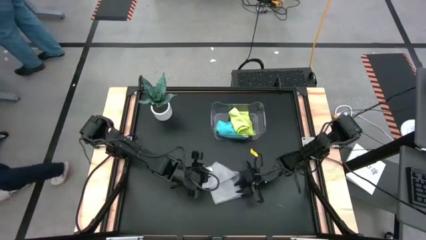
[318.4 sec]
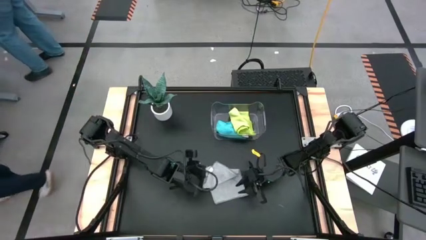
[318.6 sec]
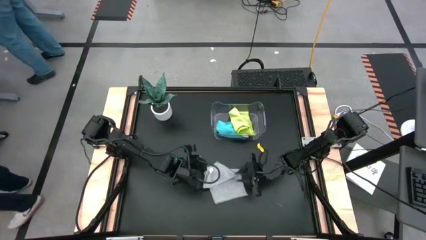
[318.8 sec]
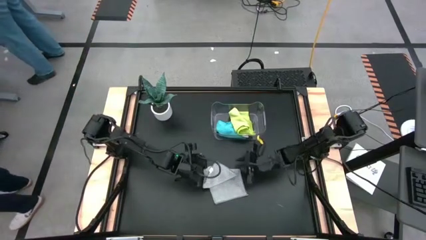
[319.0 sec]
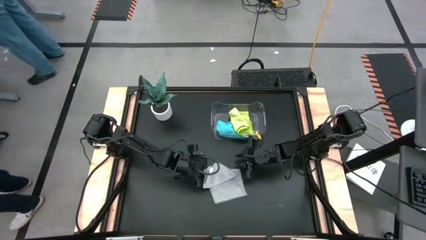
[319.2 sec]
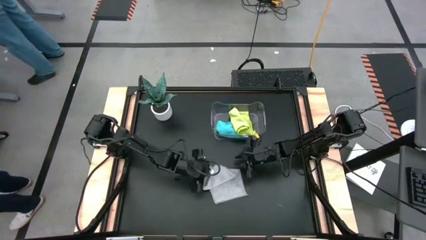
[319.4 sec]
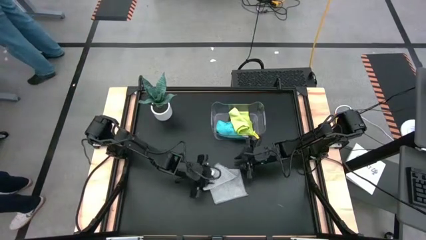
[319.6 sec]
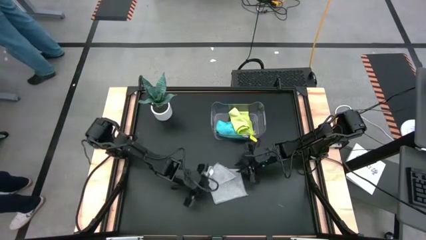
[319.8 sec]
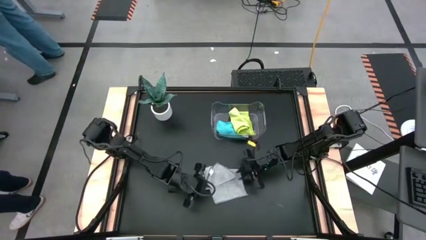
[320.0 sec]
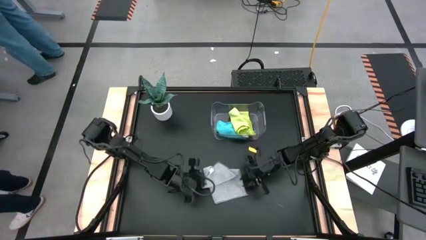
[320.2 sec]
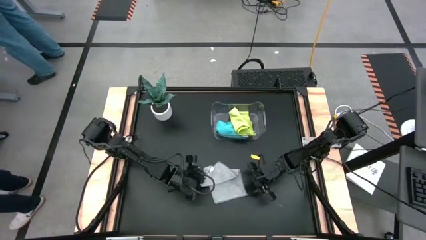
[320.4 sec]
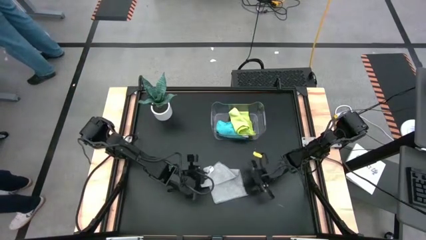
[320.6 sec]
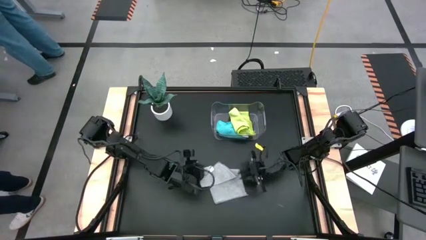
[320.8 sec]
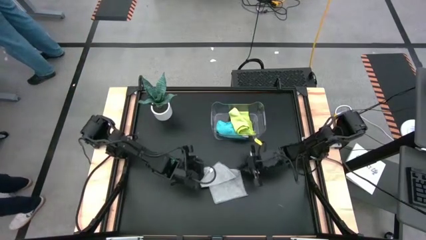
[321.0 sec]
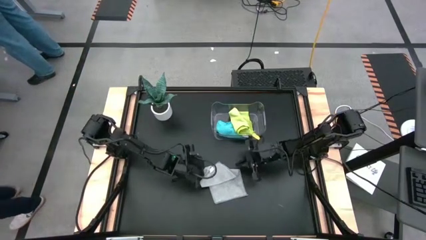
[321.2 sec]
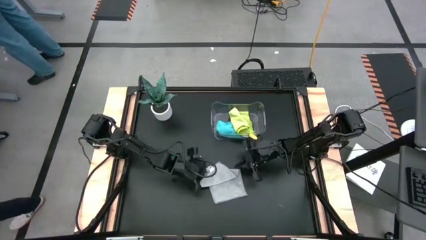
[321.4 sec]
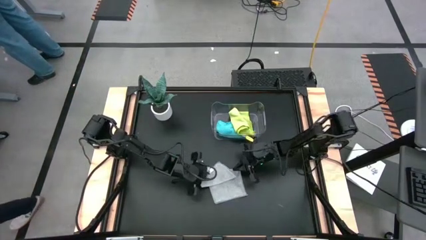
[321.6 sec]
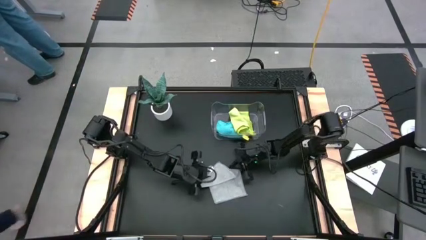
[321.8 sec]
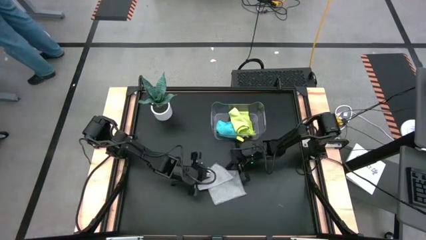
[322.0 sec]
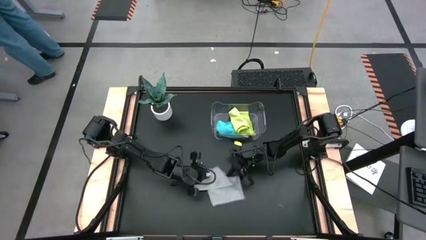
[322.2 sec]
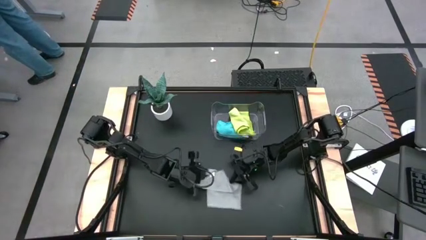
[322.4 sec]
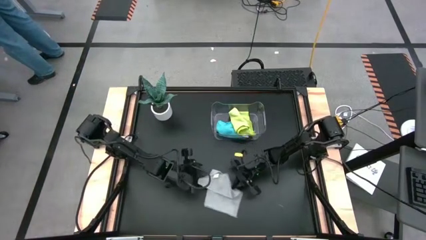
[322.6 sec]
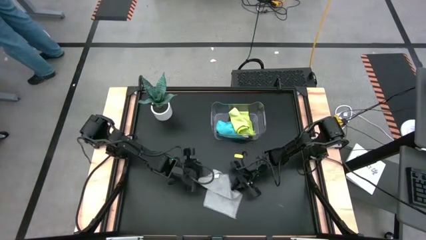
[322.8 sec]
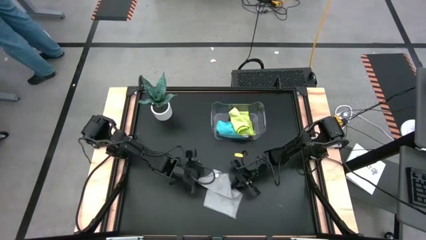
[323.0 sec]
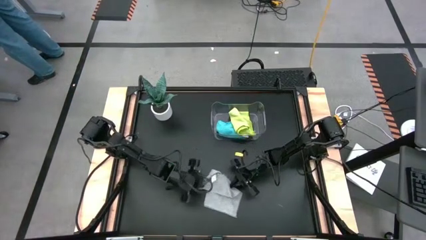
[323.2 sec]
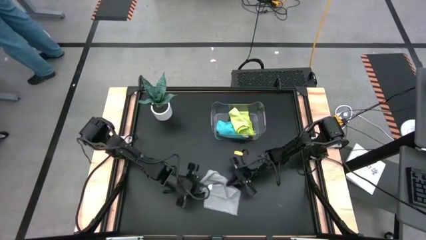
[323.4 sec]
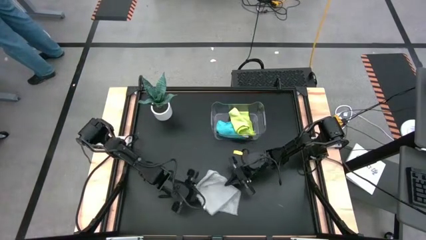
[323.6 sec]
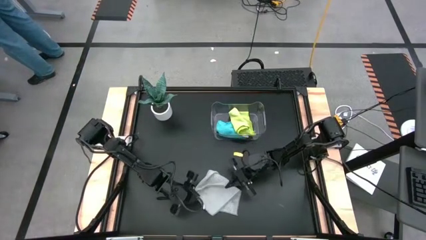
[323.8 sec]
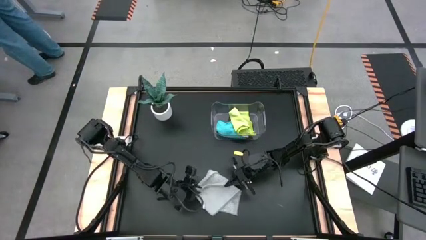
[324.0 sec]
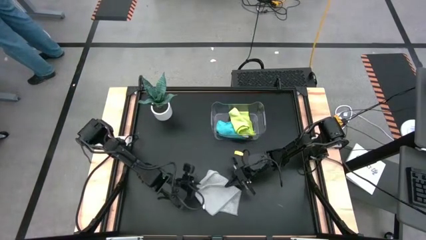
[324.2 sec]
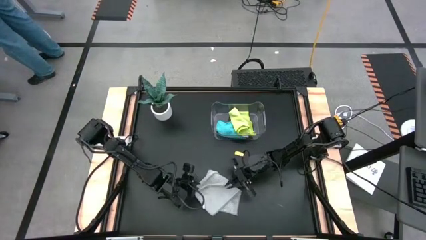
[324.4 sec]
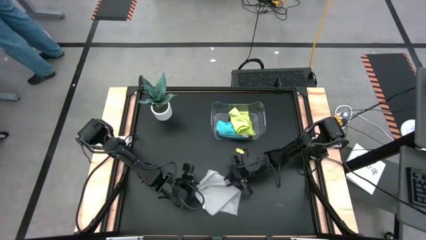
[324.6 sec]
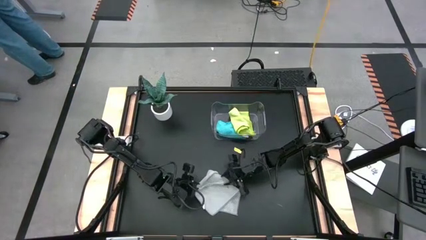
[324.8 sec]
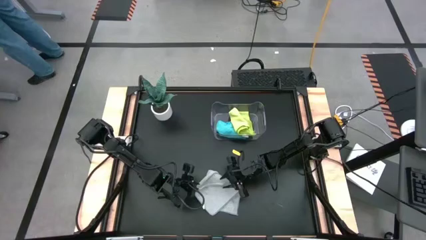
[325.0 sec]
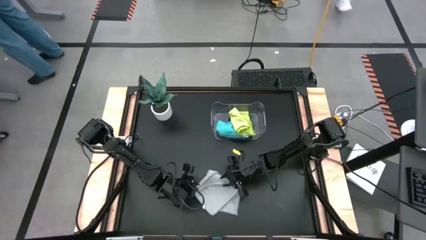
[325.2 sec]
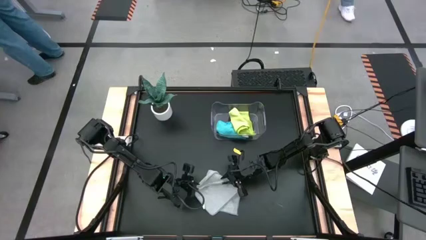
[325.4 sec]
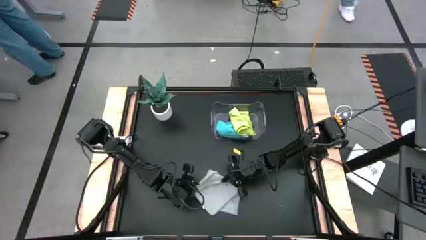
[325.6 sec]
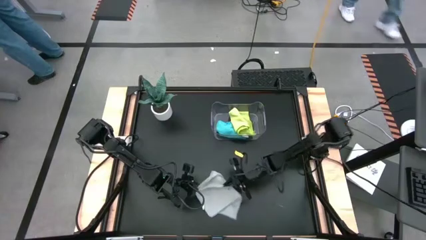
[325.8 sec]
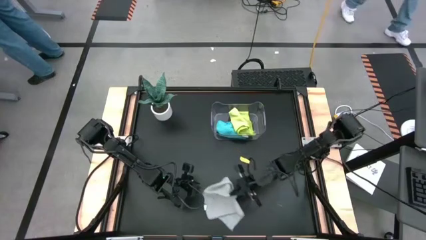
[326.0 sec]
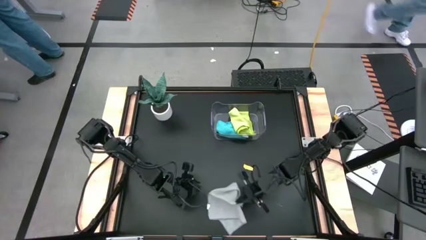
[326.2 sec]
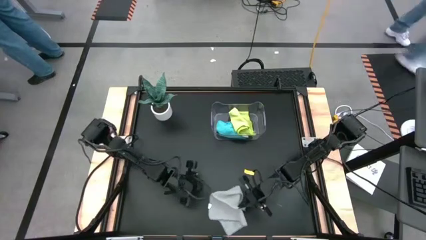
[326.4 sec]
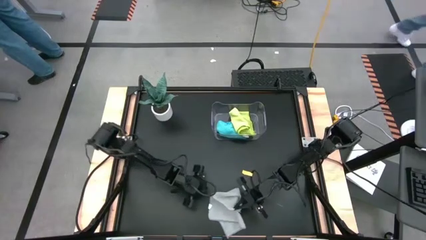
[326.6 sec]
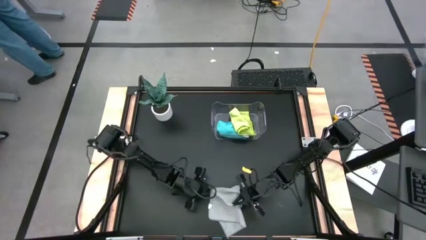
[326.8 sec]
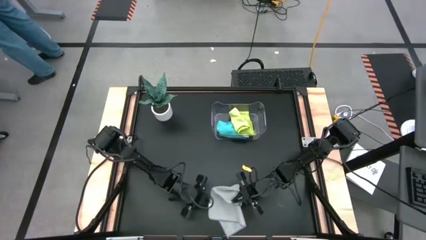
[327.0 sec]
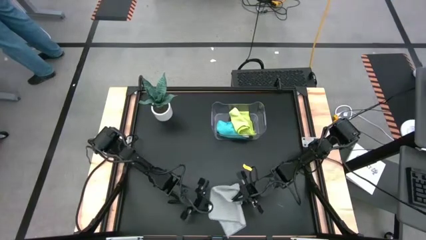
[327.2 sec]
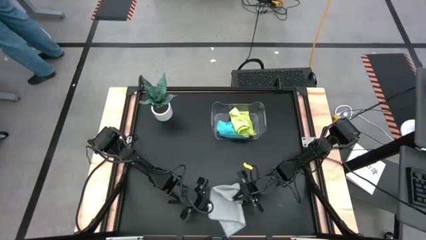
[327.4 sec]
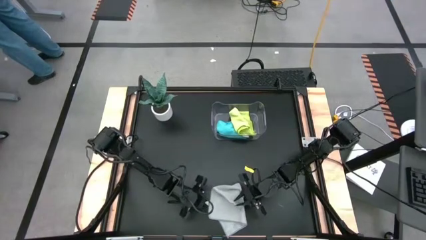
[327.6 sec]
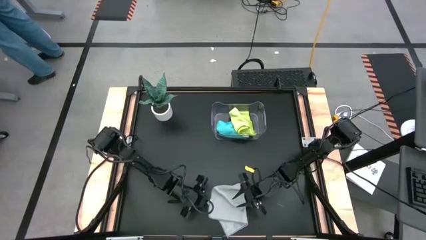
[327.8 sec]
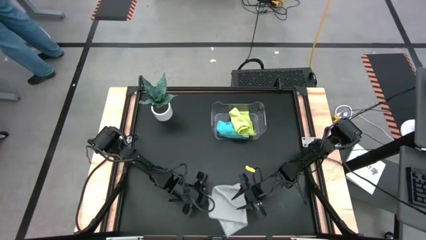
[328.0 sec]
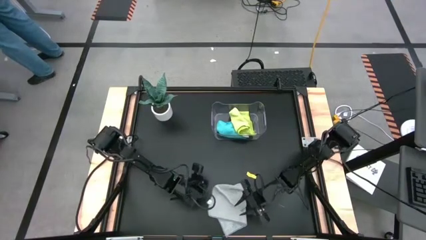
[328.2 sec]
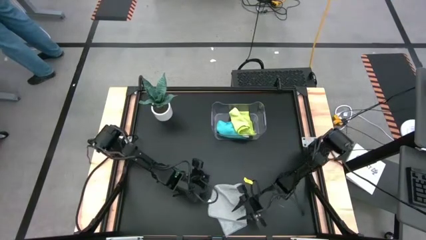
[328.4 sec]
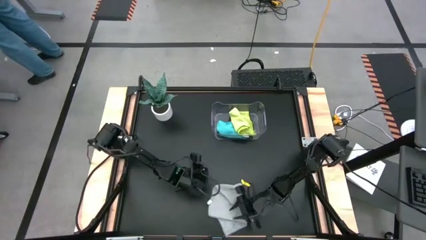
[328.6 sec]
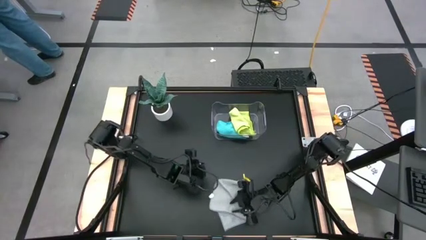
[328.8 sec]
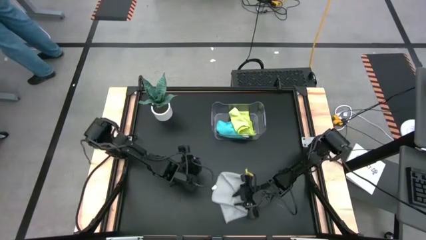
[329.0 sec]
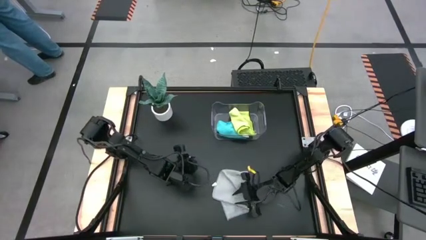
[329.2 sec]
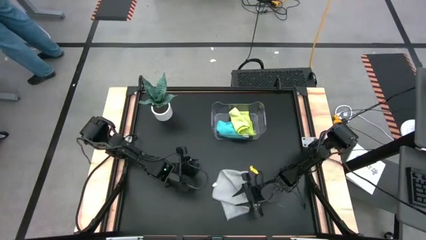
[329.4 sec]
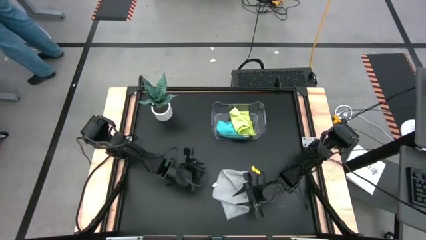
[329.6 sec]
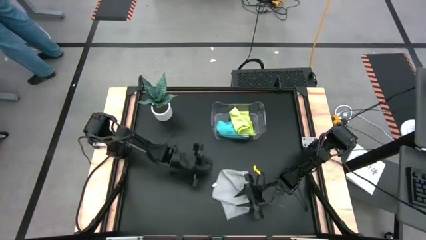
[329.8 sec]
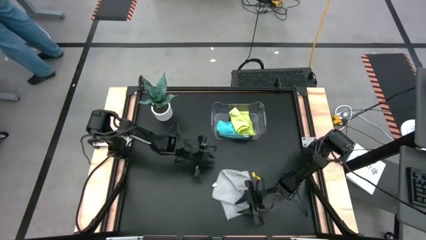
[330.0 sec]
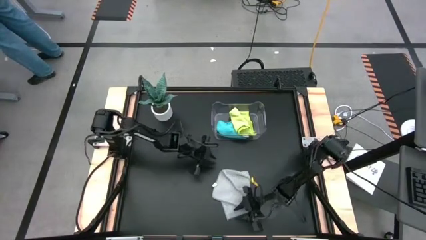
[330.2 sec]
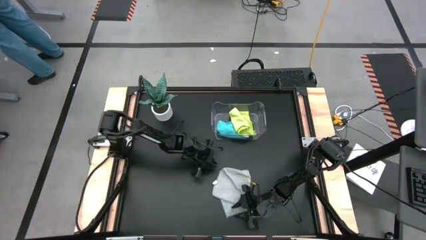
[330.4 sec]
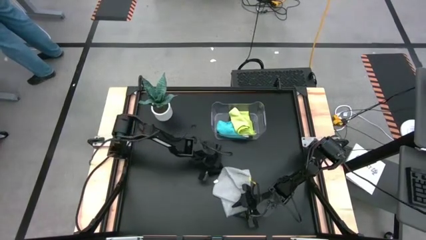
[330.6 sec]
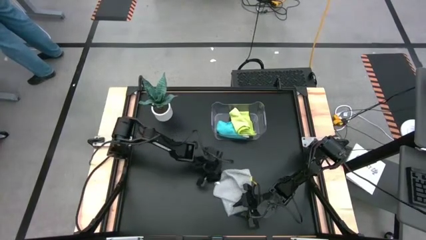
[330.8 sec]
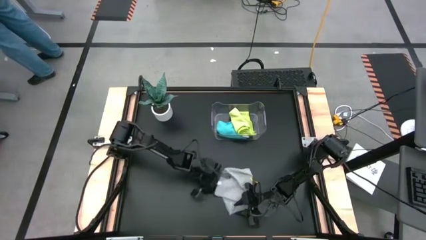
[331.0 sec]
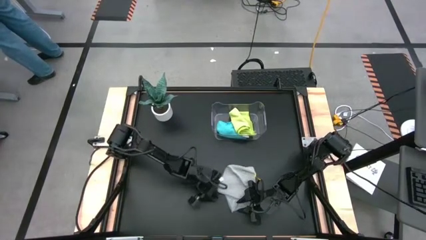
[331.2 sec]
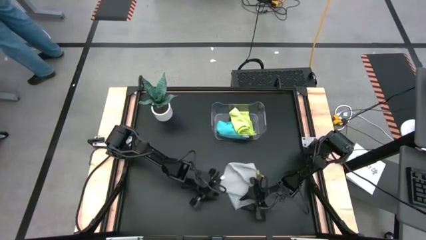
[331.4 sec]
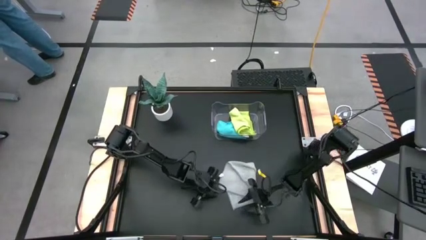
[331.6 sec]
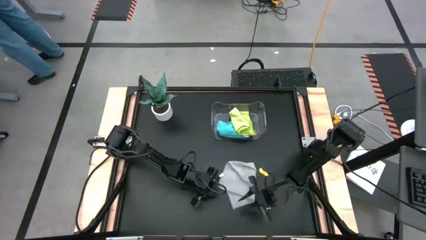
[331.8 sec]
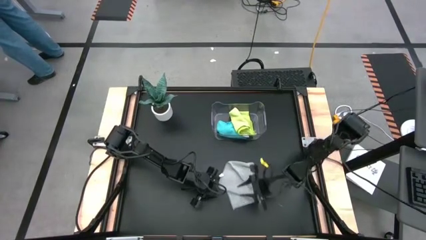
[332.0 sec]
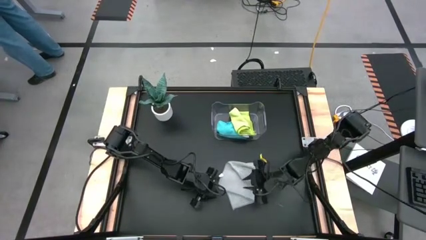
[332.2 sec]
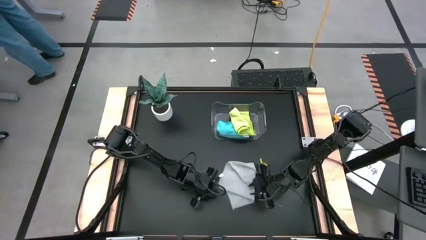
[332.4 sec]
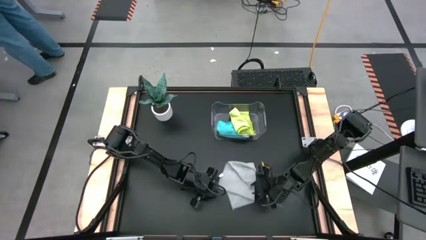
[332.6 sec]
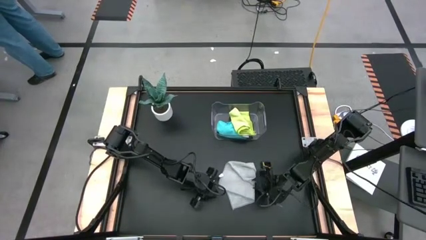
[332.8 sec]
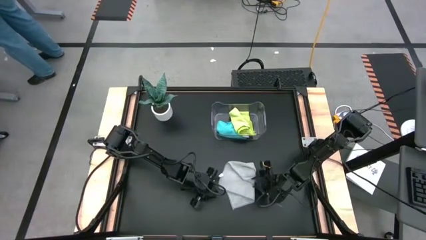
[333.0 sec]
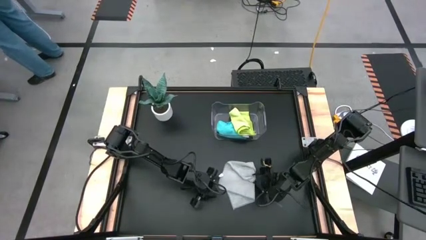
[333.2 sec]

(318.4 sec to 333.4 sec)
Task: Fold microfiber towels
Fold the gray towel
